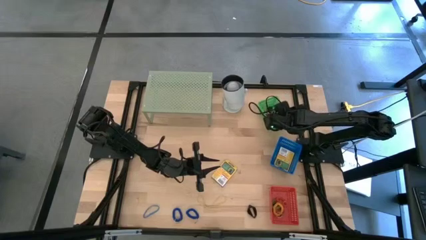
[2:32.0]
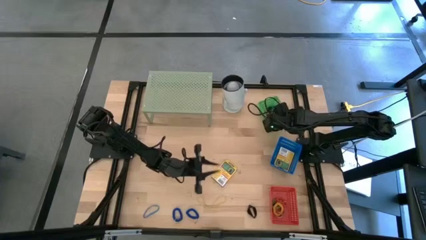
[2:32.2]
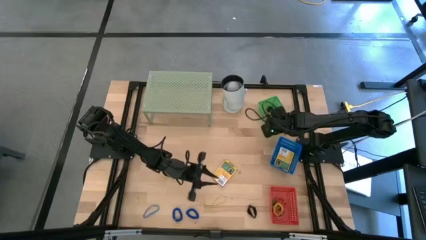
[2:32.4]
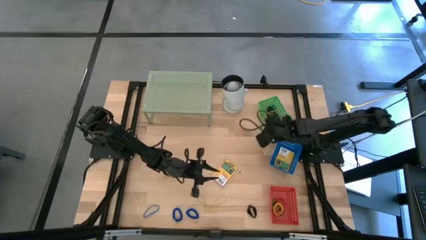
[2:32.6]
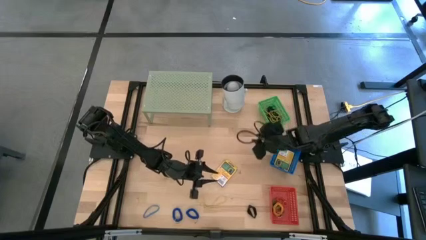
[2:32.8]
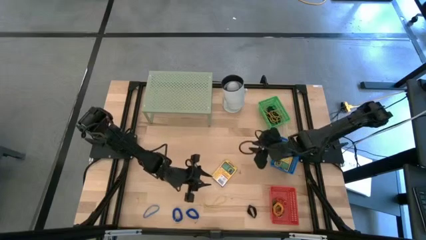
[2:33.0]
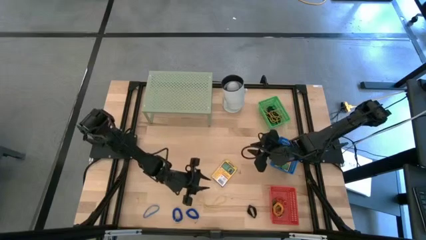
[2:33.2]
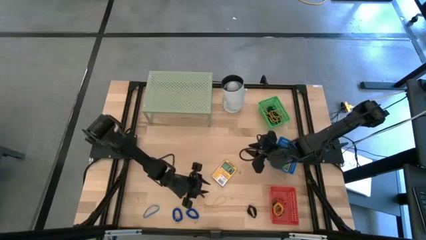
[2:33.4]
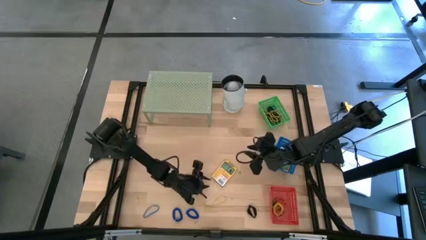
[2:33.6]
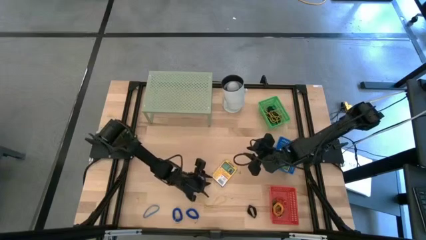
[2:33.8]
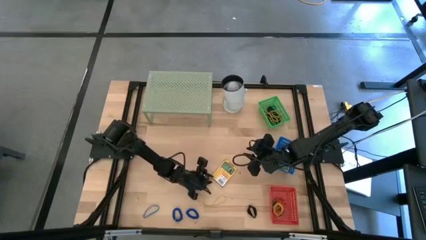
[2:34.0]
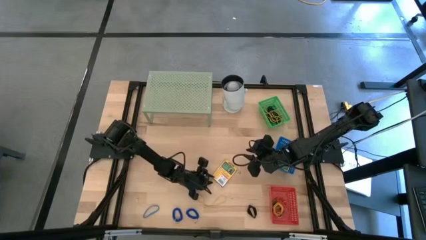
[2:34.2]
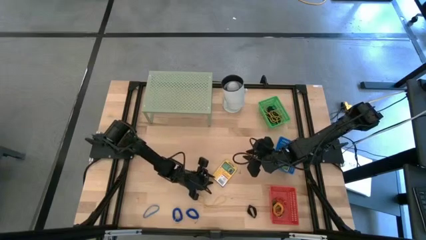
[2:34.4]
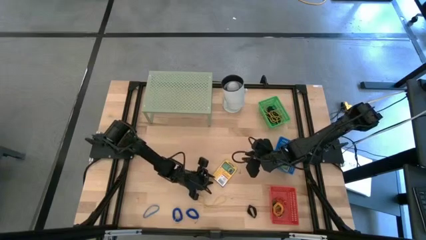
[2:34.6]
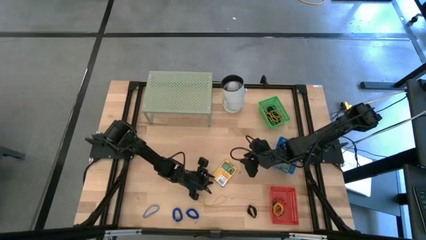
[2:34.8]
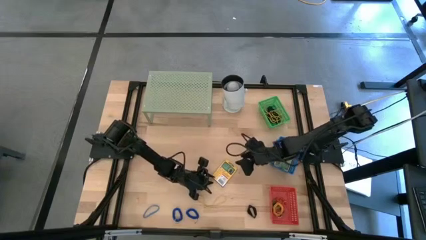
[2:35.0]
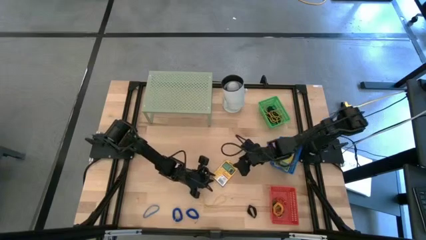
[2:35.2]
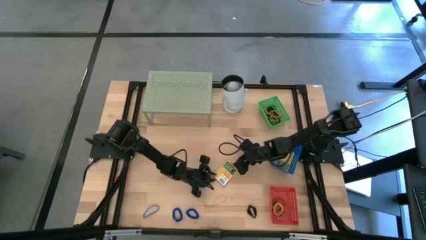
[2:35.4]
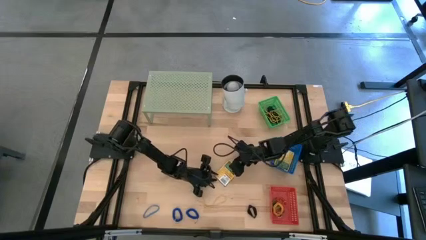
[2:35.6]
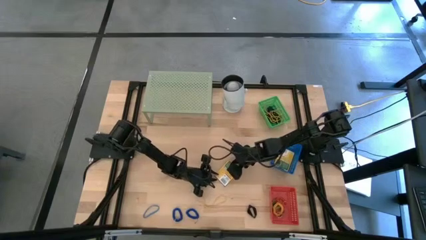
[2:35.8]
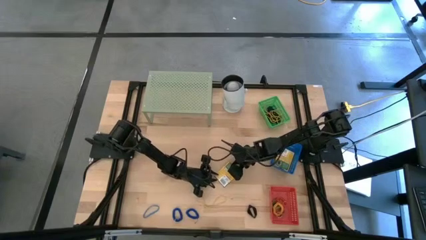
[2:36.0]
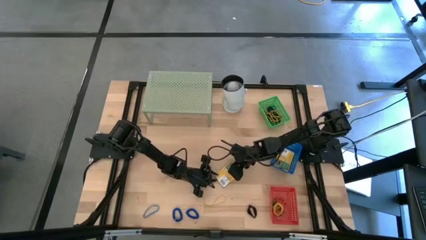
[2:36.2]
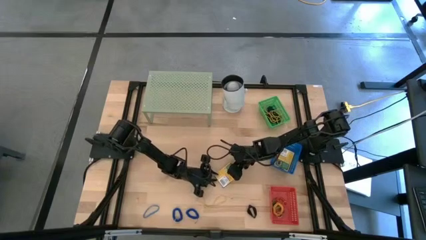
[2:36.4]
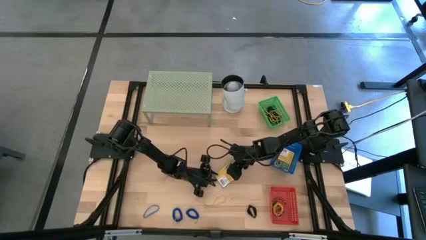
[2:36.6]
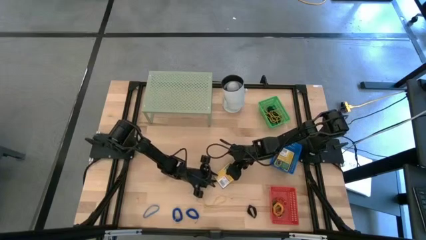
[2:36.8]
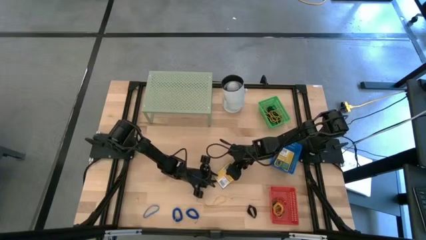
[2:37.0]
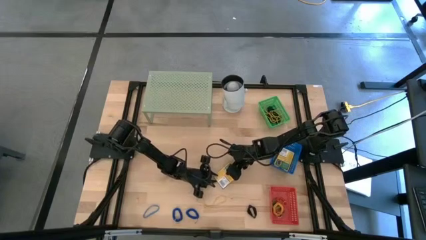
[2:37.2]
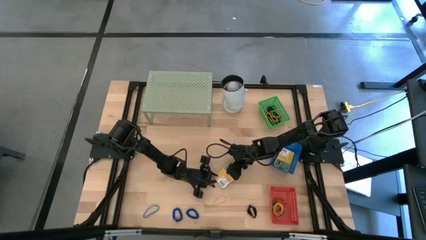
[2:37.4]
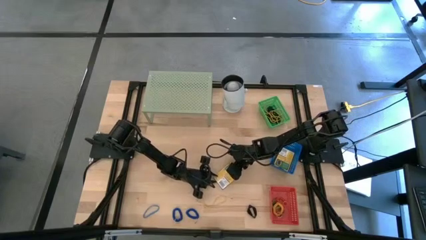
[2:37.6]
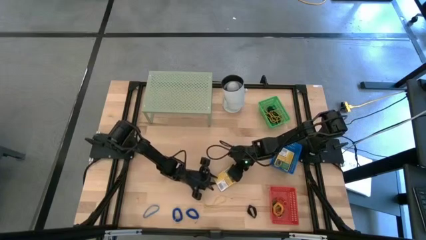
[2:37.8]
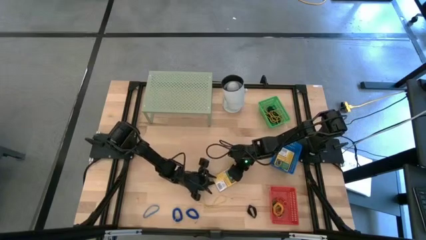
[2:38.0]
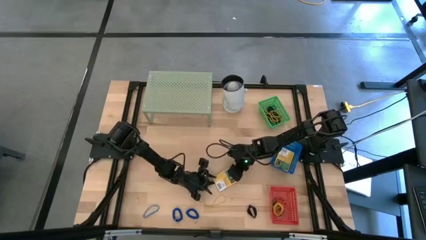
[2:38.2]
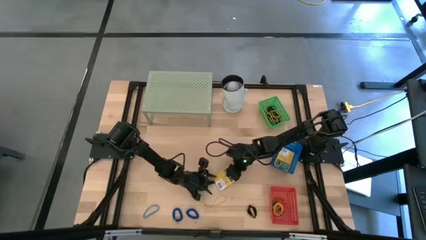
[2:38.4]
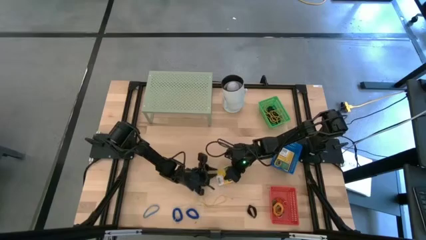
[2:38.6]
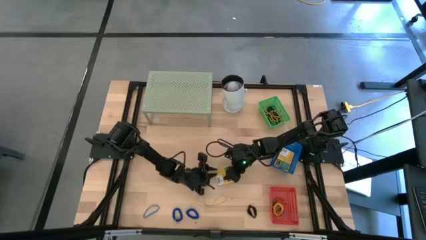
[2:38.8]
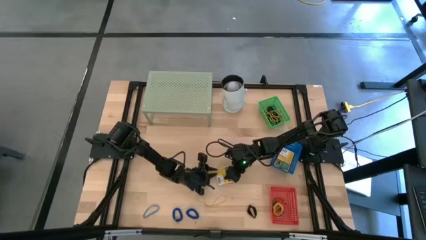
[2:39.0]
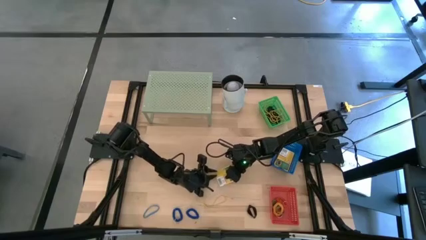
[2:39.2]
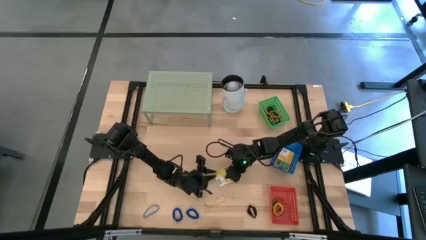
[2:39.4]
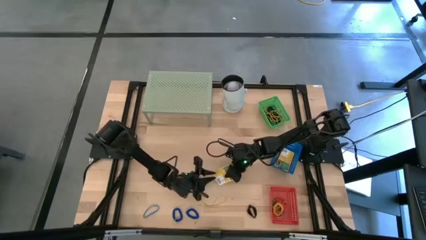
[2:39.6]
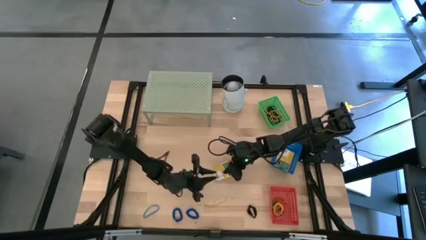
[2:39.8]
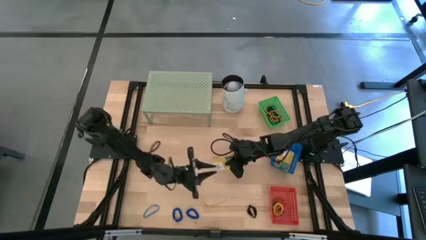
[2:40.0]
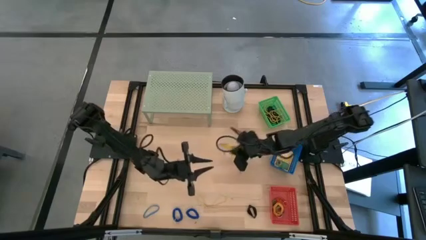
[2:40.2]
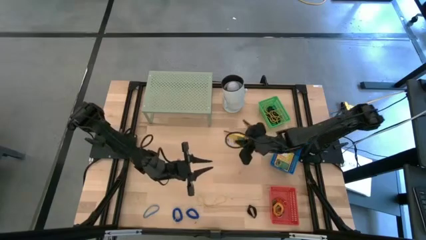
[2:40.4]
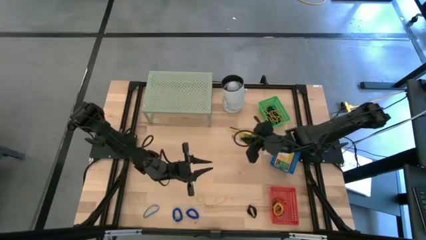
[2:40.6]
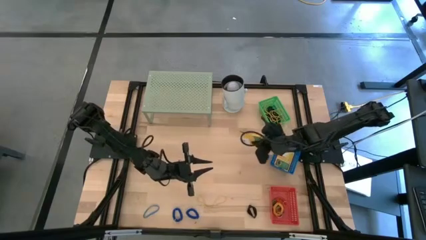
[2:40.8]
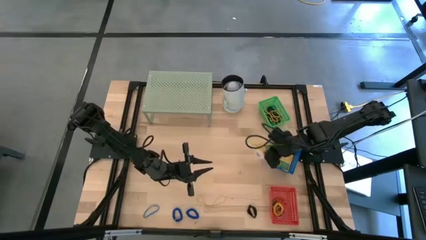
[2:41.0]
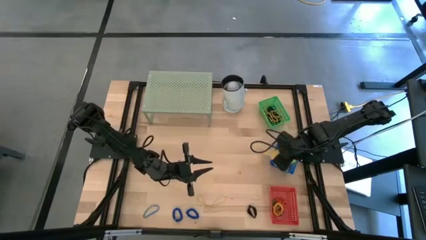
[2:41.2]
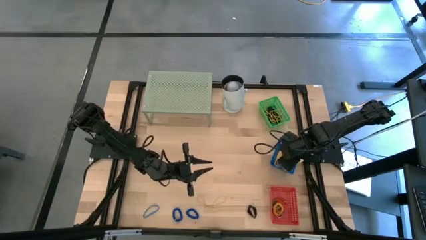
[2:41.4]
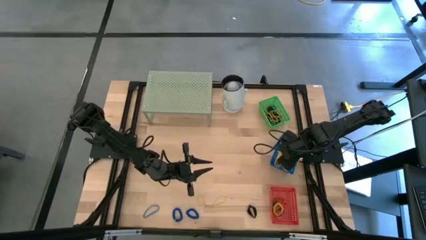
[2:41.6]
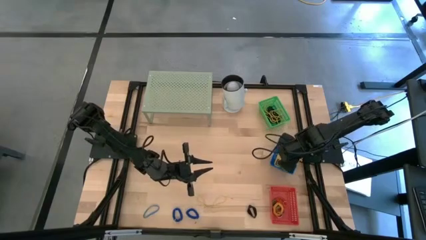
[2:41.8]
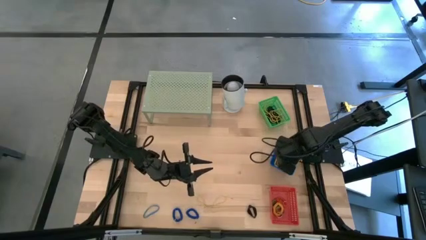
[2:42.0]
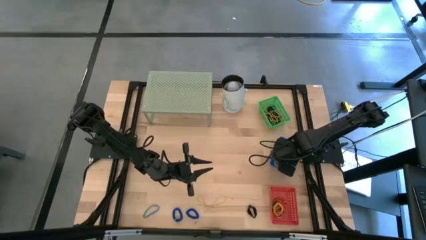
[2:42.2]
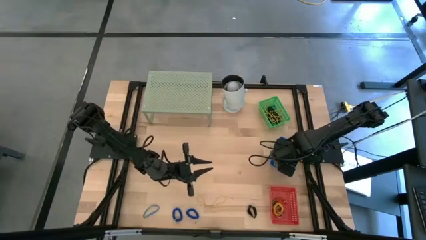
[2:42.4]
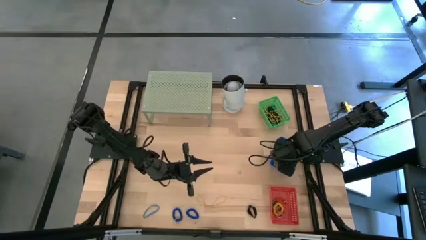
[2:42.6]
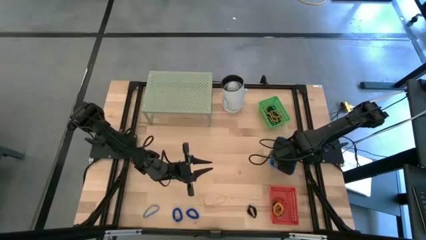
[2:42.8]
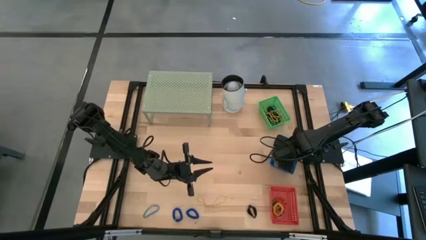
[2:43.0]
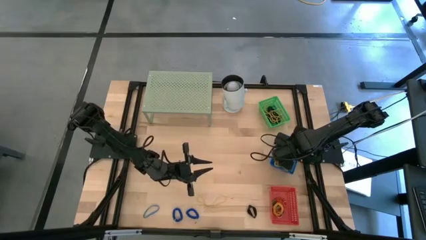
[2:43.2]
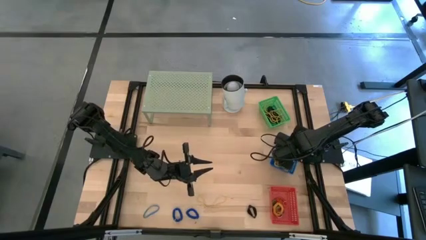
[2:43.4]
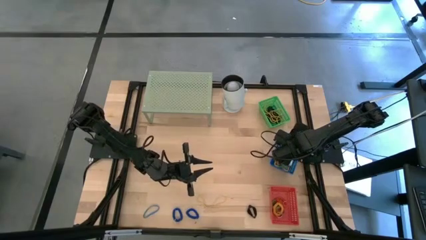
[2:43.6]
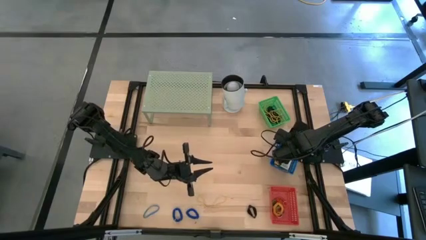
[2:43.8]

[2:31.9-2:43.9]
Task: Pick & Place Office Desk Supplies
Put the yellow crayon box into the blue bin

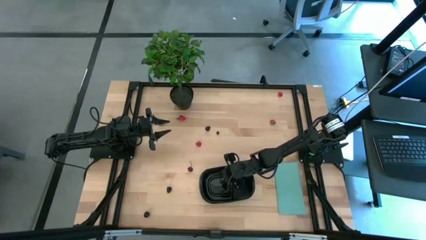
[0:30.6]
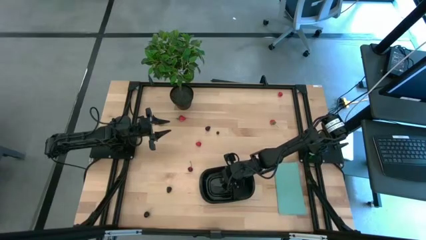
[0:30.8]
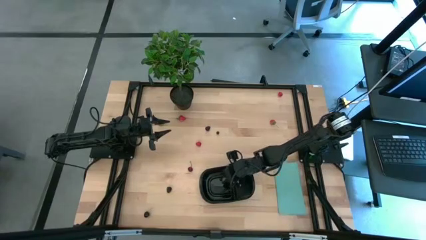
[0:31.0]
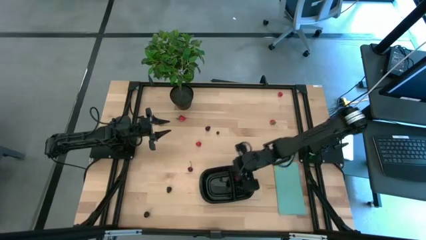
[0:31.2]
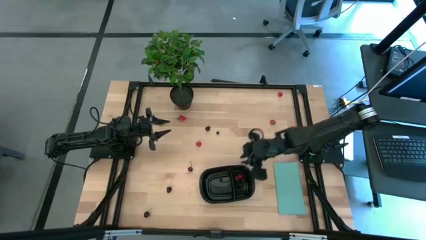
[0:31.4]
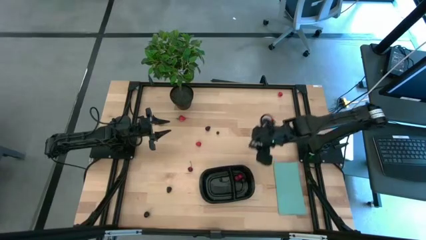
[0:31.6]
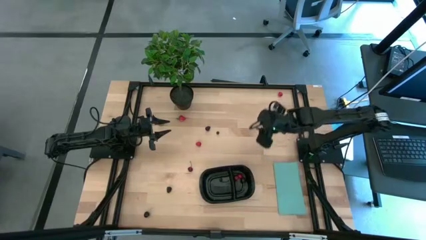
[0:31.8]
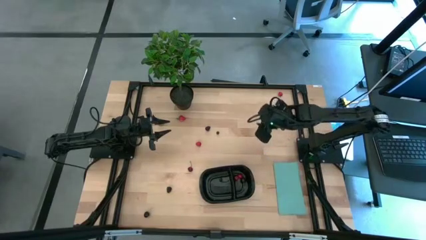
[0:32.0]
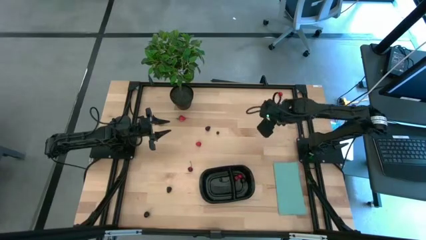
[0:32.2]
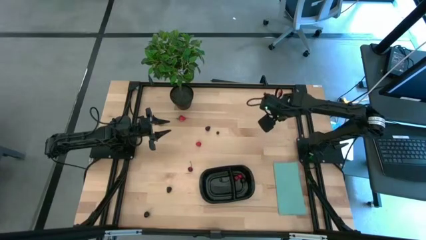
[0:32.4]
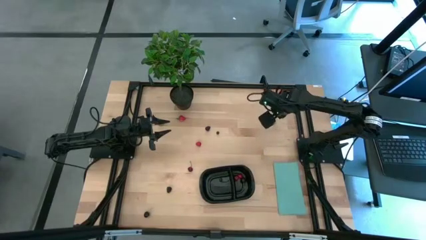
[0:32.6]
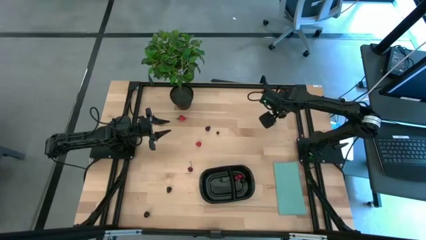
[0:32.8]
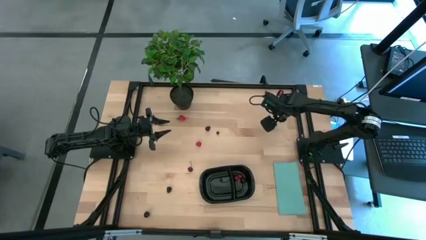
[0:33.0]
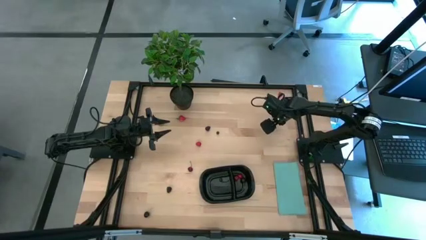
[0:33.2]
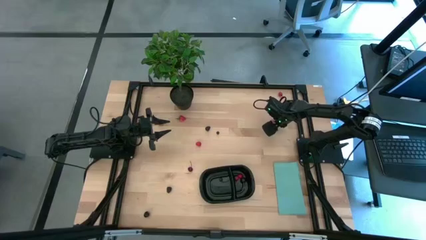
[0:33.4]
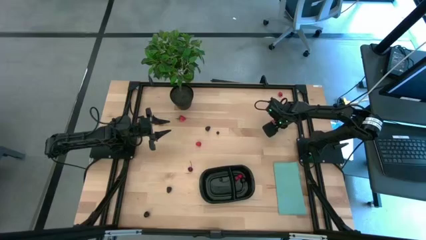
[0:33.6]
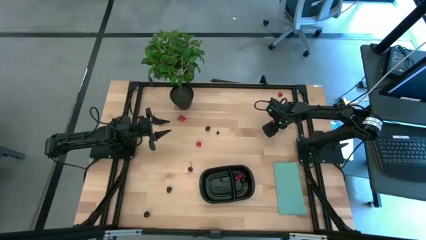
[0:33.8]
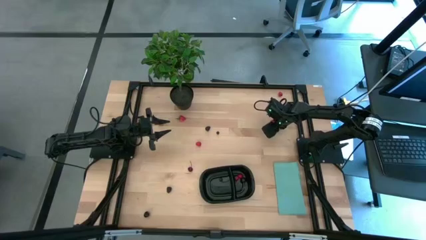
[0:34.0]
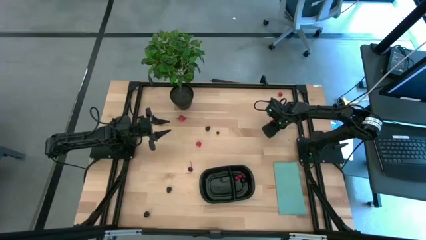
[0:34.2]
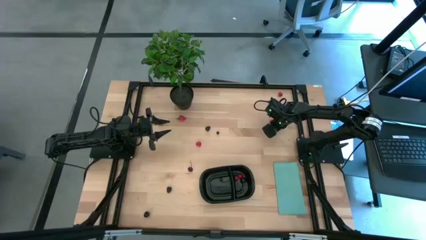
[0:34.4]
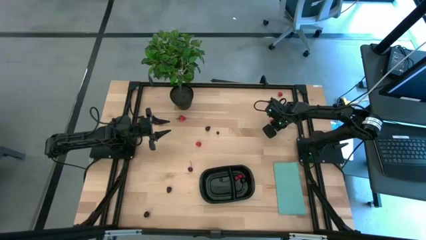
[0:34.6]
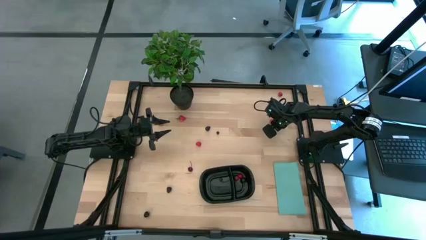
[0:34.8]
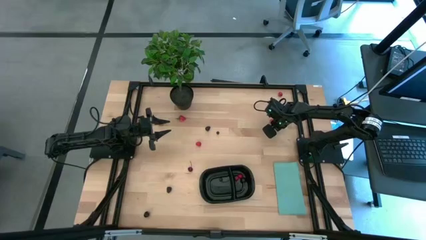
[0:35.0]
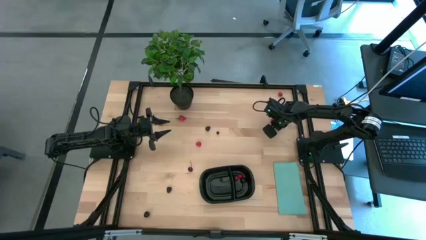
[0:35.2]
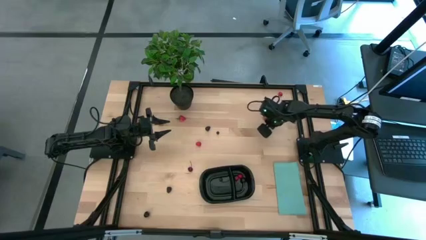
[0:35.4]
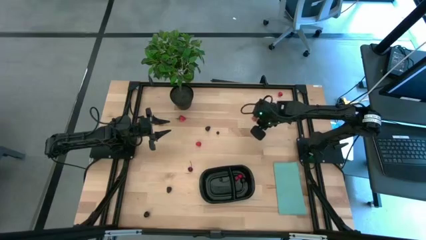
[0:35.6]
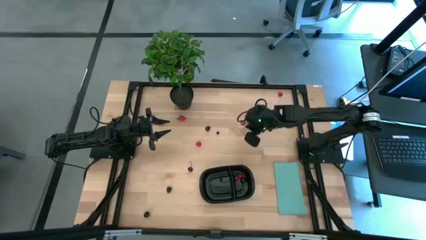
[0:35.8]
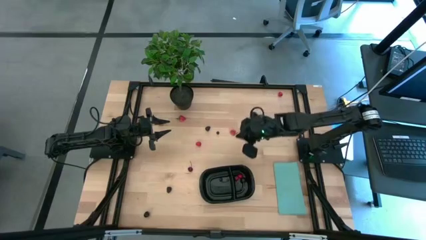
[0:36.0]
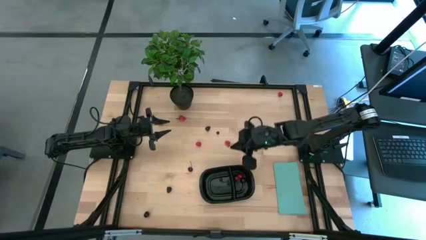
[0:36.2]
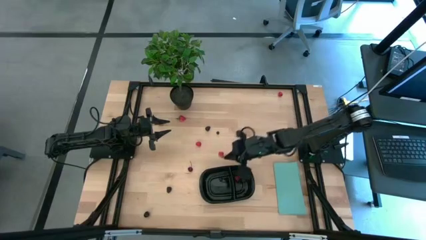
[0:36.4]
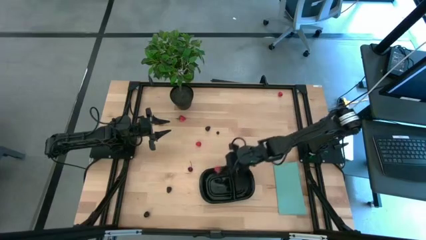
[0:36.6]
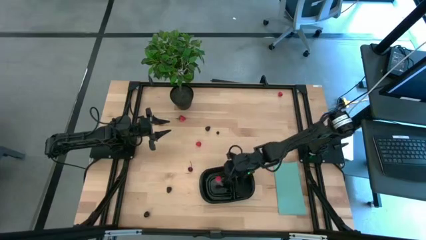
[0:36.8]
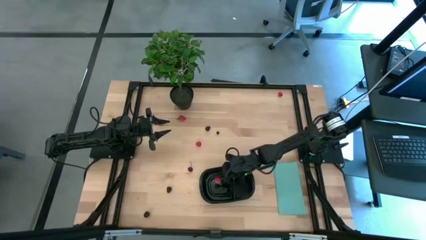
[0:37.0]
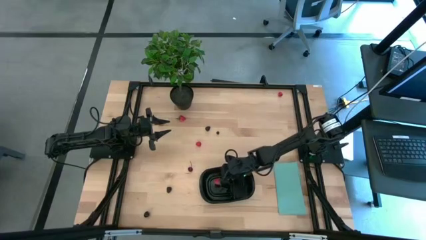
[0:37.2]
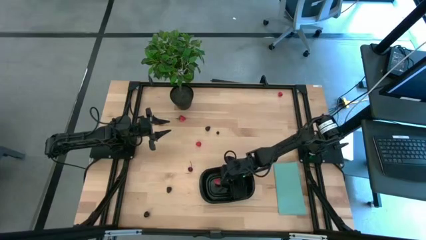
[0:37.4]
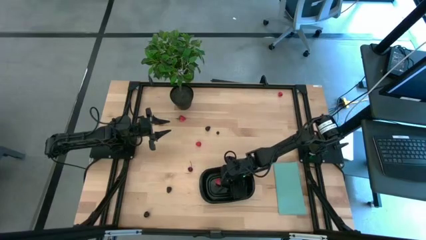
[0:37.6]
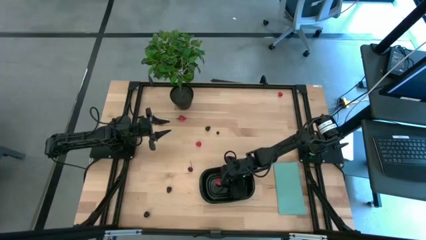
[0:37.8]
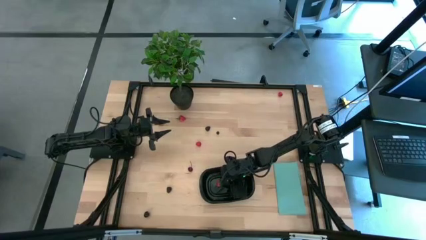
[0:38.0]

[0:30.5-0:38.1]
Task: Pick and placing Produce into tupperware
Put the right strawberry into the left side of the black container
